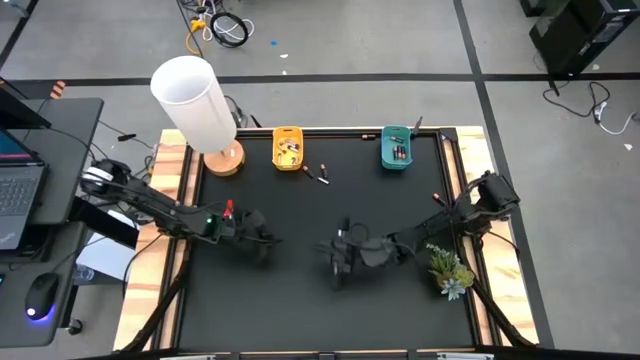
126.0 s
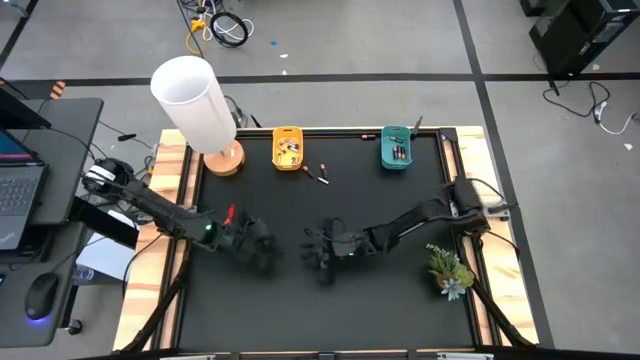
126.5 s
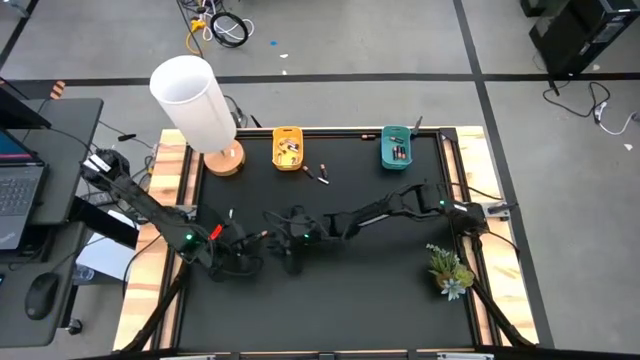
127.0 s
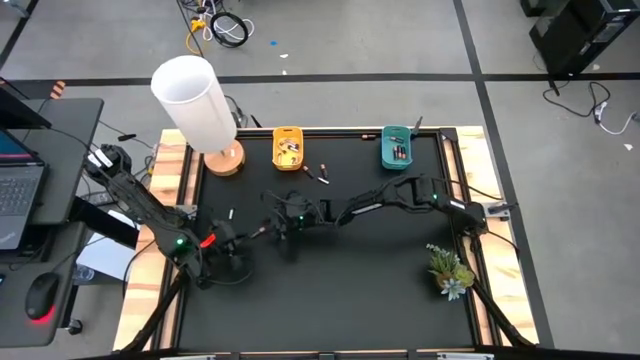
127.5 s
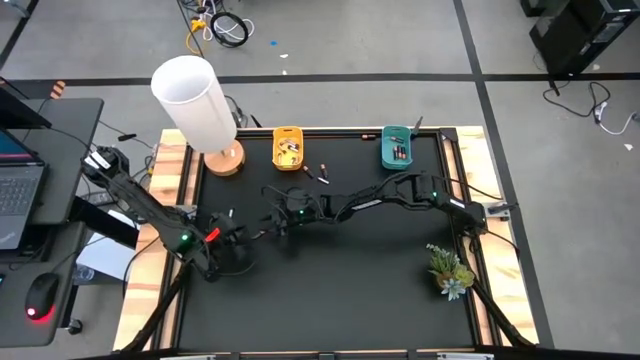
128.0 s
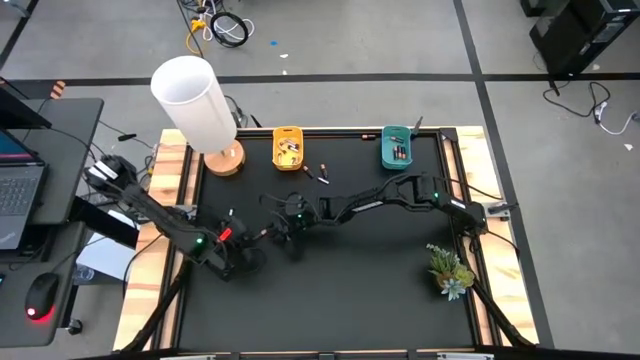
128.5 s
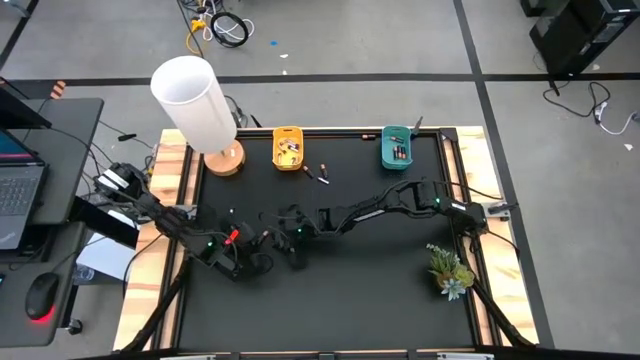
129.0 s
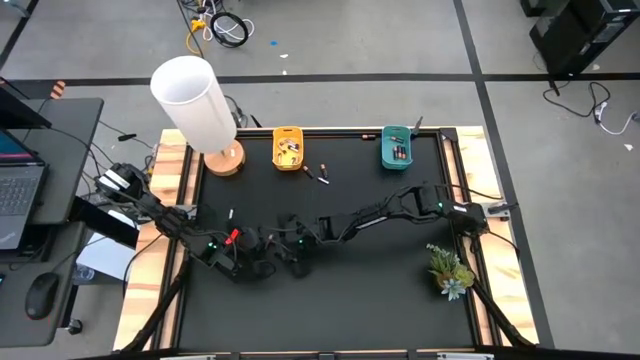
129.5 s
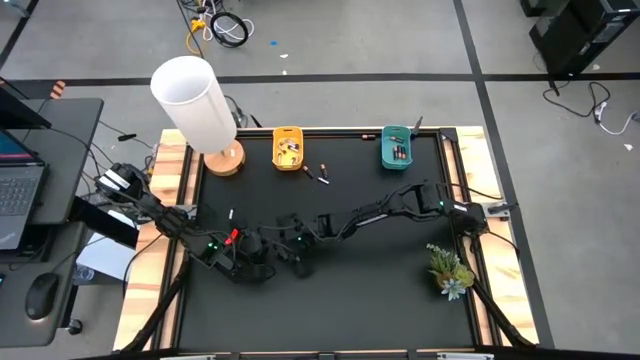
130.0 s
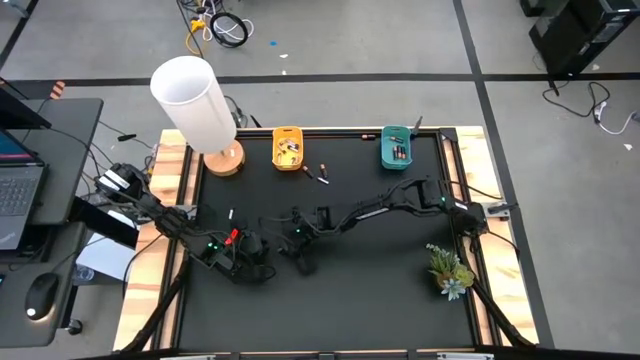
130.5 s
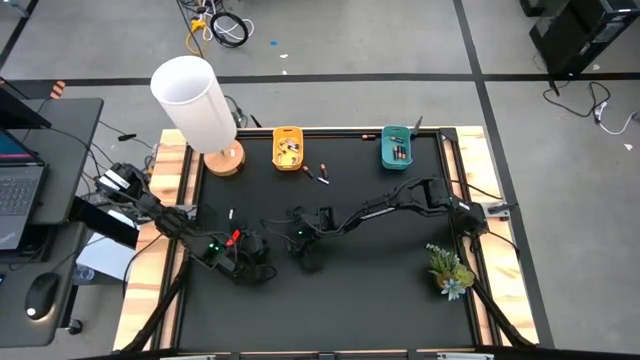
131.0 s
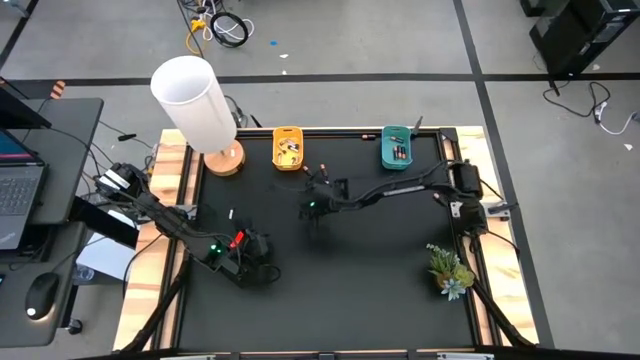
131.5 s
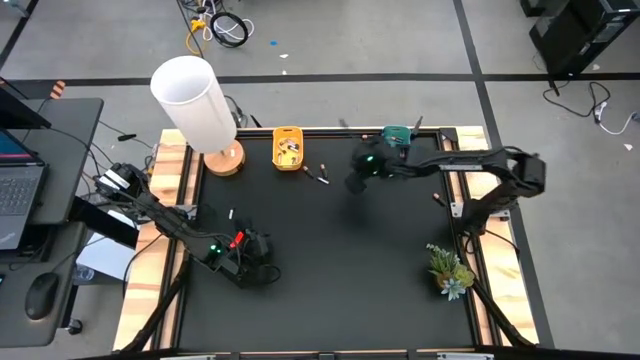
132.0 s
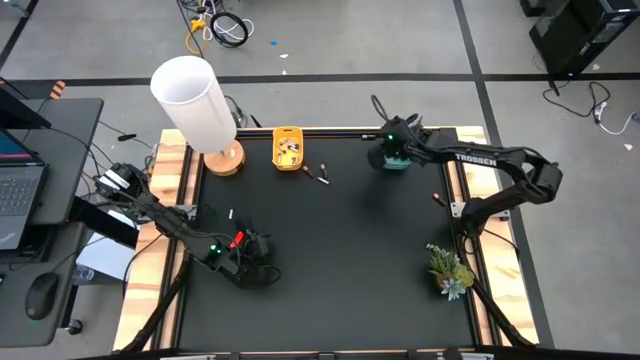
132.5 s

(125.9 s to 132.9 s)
Task: Sort batteries
Put the black battery into the blue bin

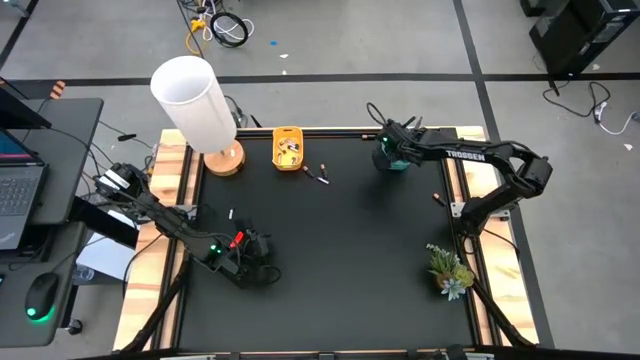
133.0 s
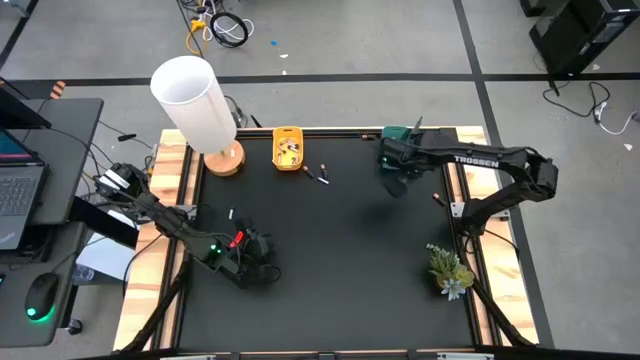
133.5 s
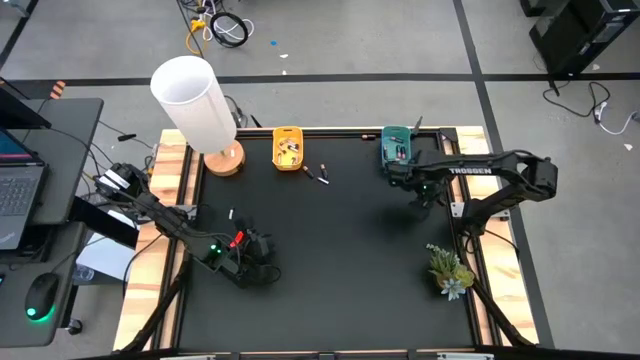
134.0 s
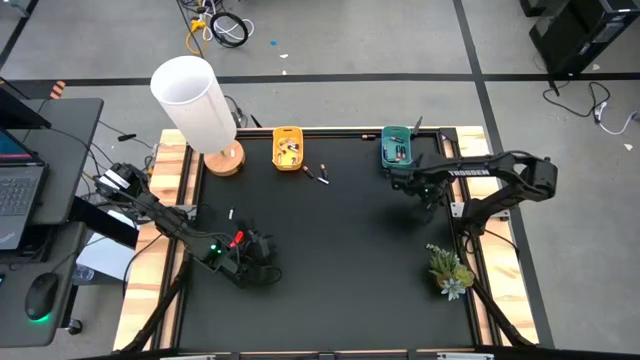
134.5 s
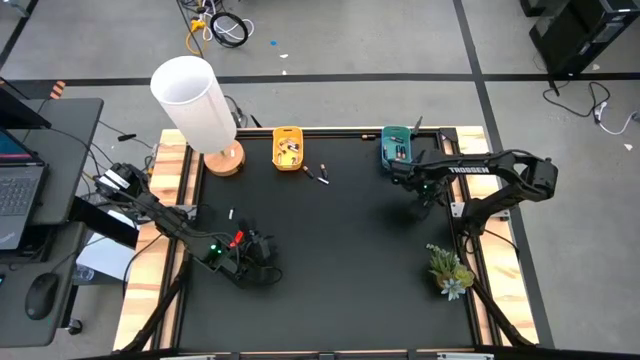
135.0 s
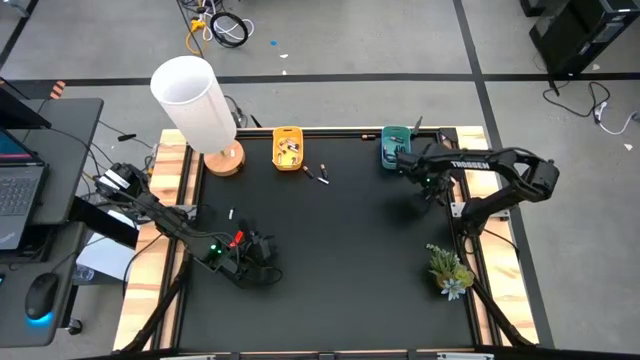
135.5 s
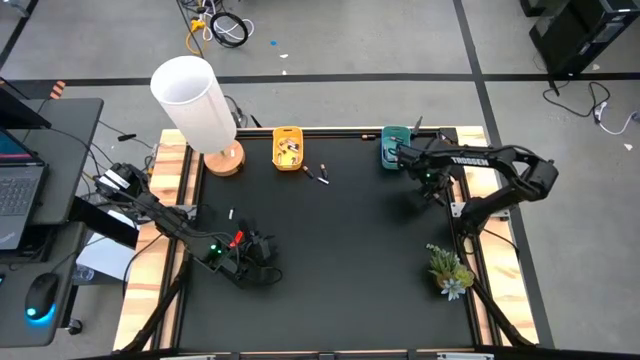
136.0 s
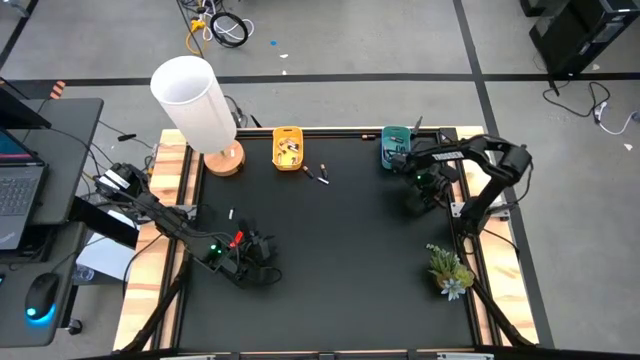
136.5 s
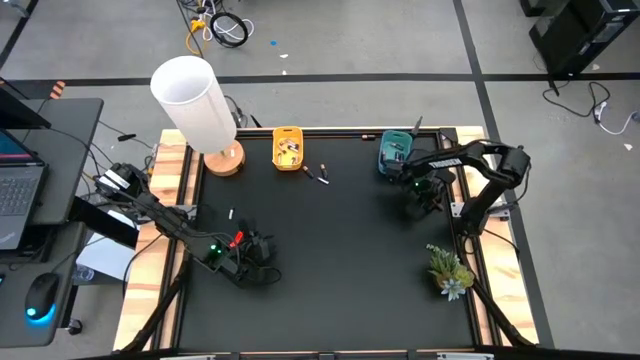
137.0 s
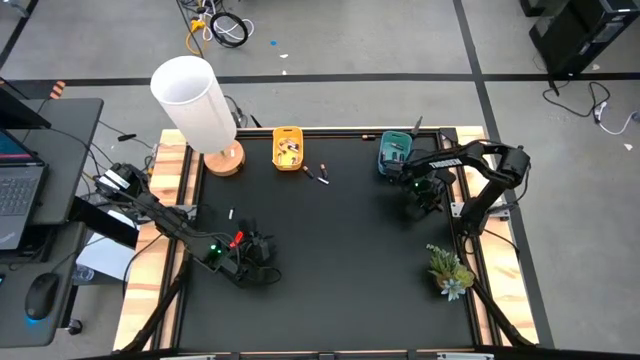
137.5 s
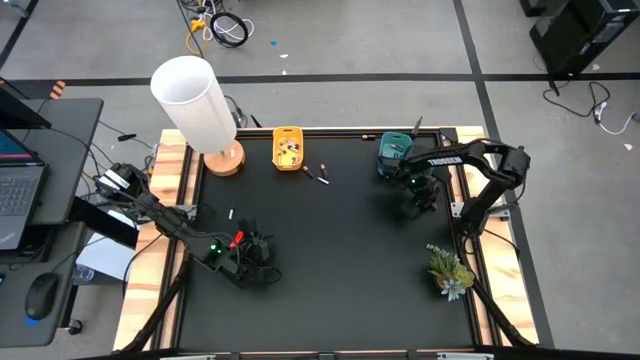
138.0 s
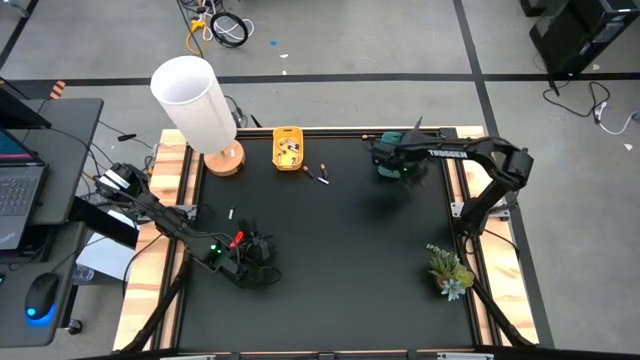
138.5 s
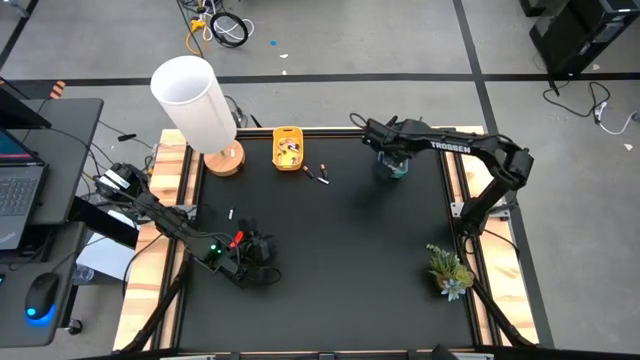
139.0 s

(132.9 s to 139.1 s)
Put the black battery into the blue bin

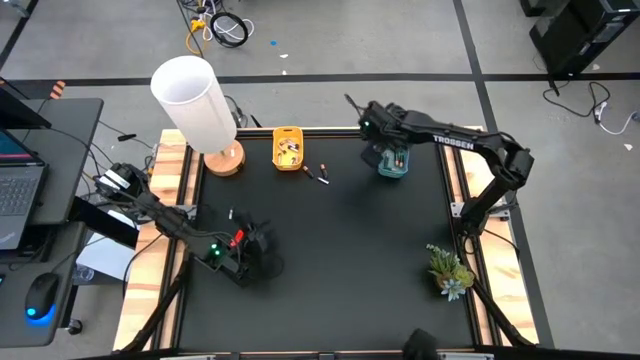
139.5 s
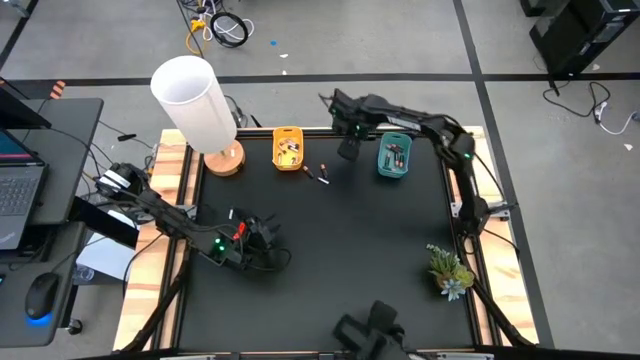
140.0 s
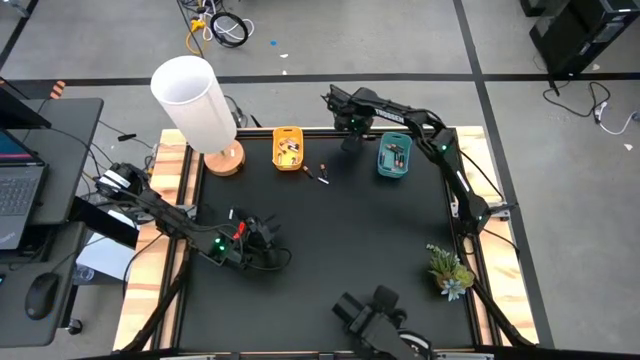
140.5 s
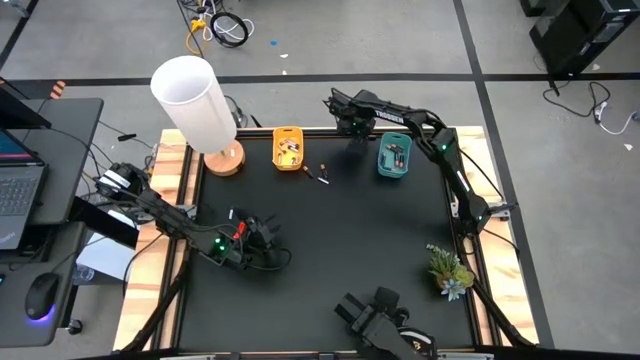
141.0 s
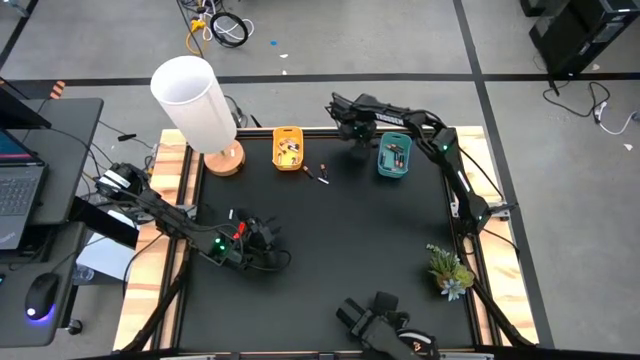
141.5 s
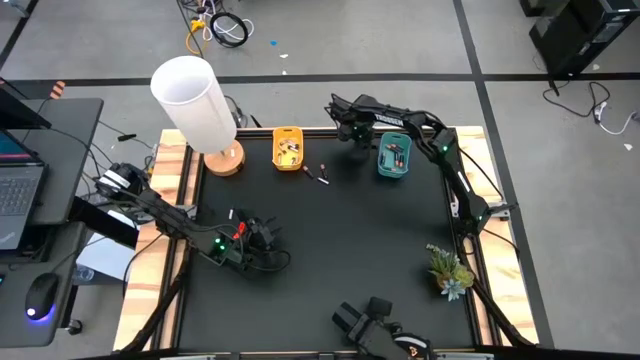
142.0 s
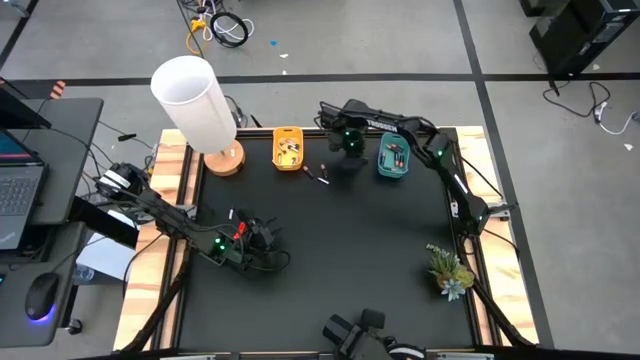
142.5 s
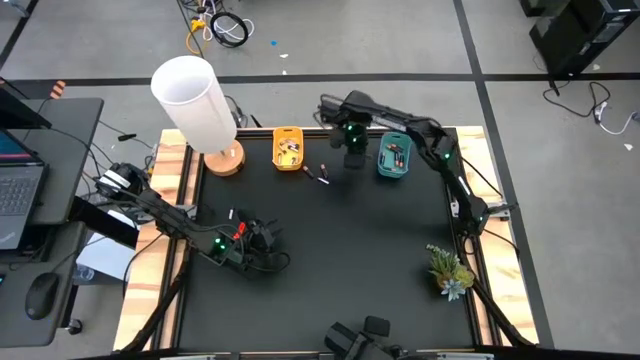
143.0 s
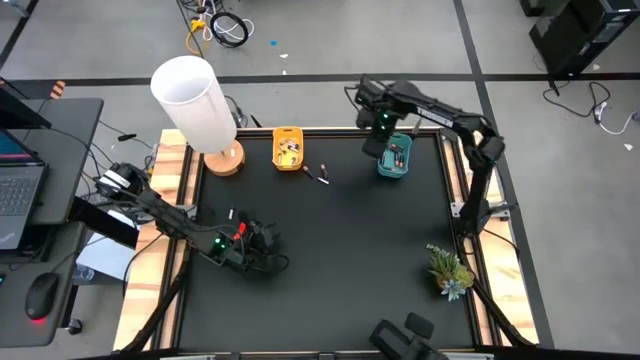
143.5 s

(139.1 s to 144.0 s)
Put the black battery into the blue bin

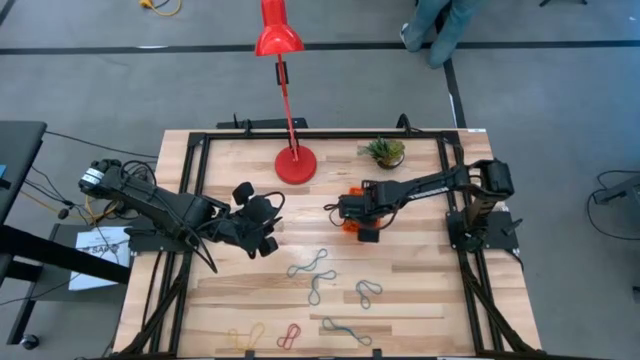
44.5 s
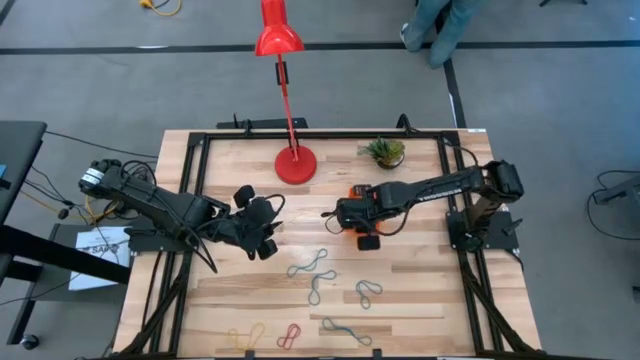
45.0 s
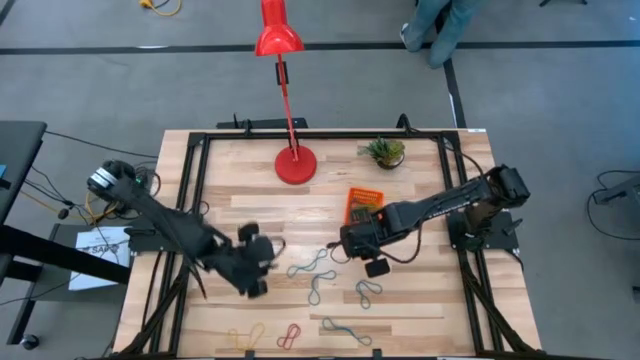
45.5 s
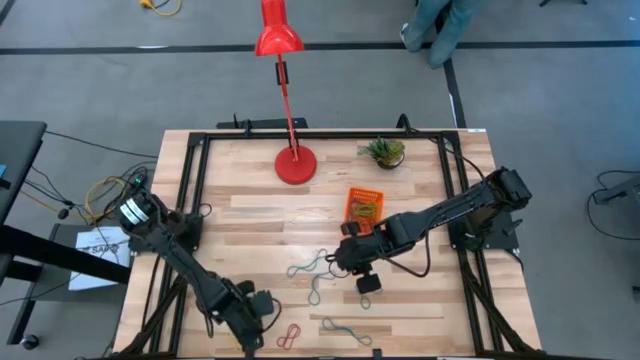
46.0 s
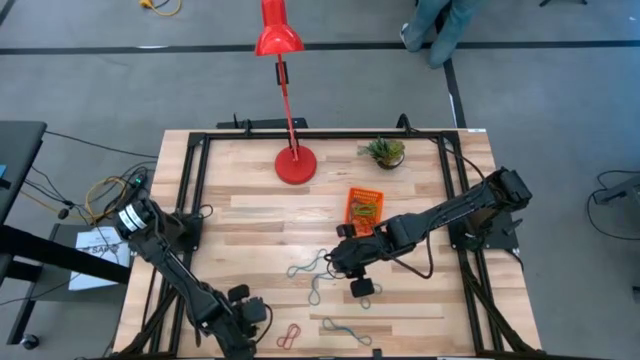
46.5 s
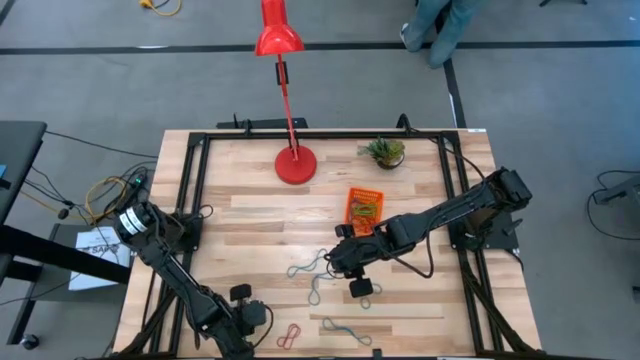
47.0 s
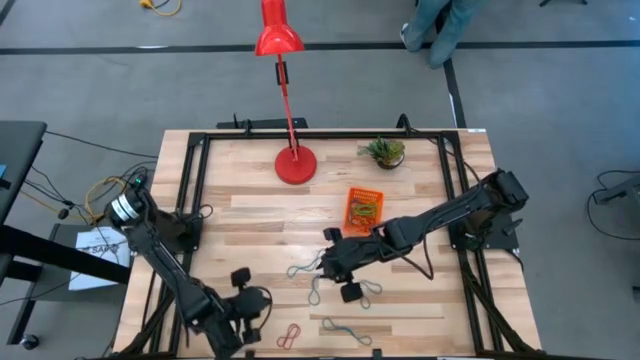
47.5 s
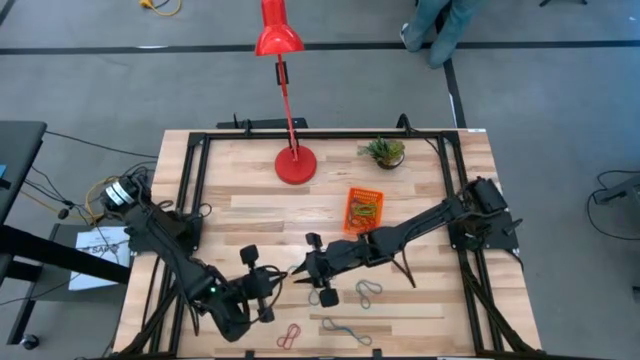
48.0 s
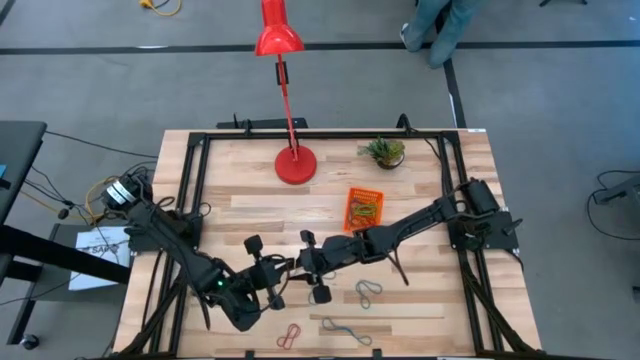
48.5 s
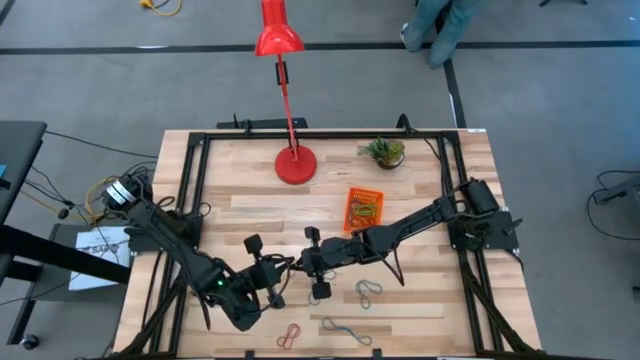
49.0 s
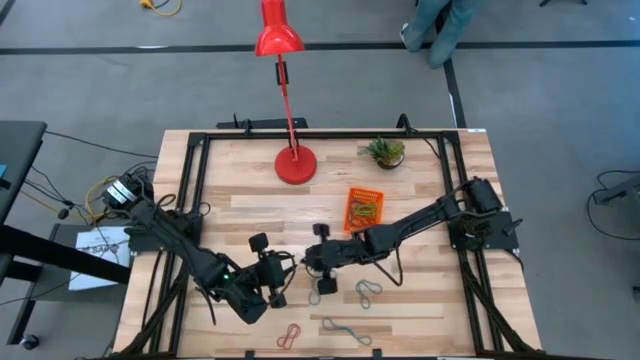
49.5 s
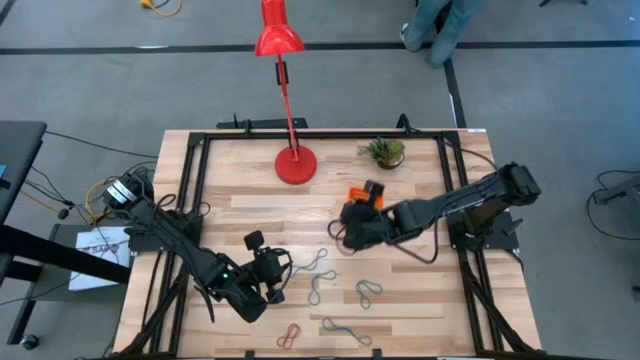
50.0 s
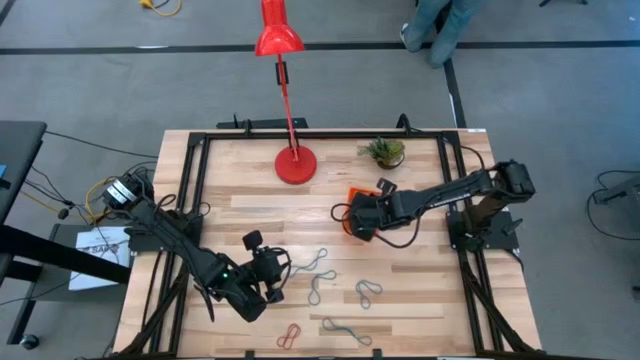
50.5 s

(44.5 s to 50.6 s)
Task: Pick and place items into bin
Put the yellow rubberband into the orange basket
